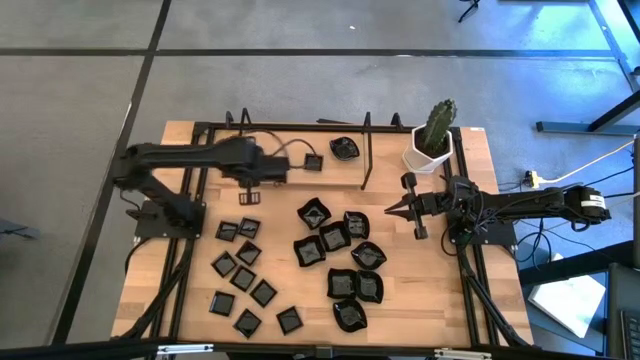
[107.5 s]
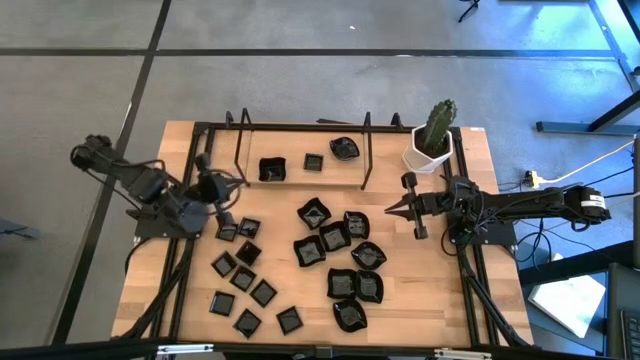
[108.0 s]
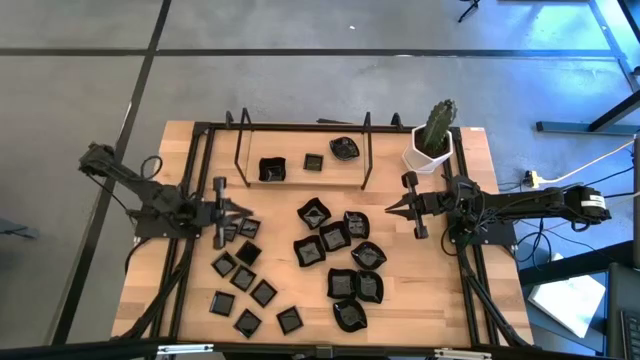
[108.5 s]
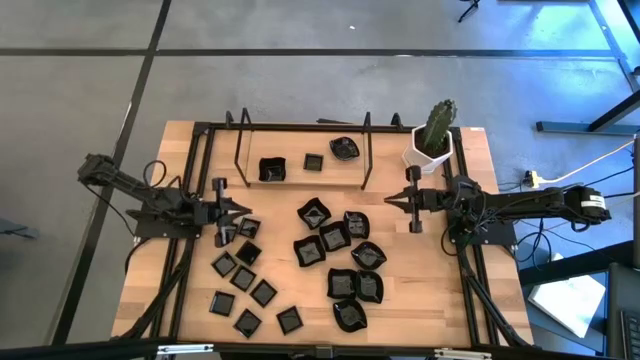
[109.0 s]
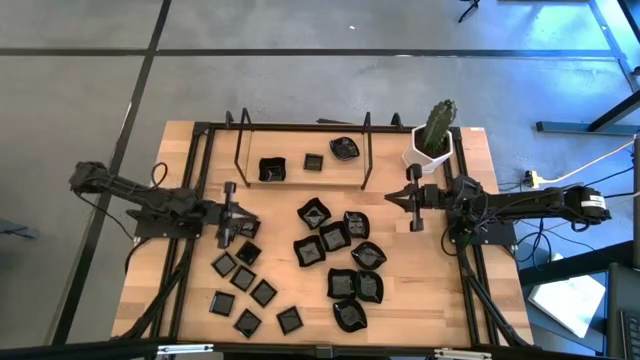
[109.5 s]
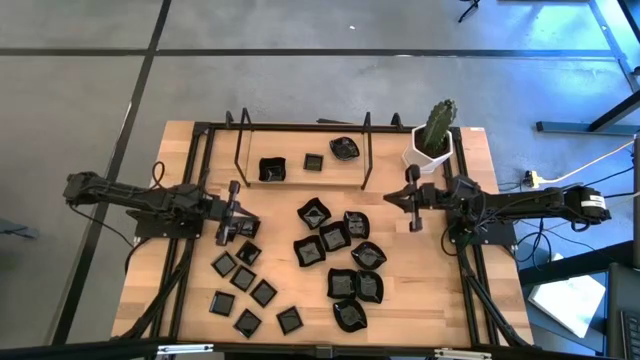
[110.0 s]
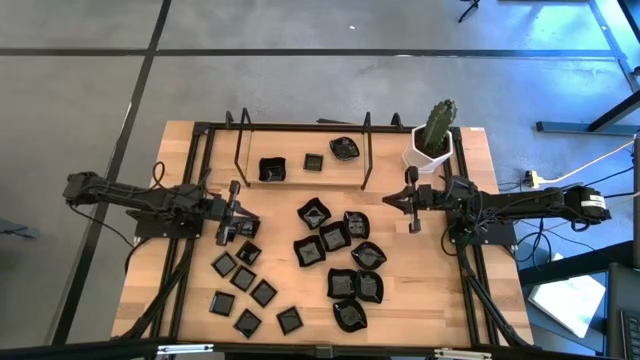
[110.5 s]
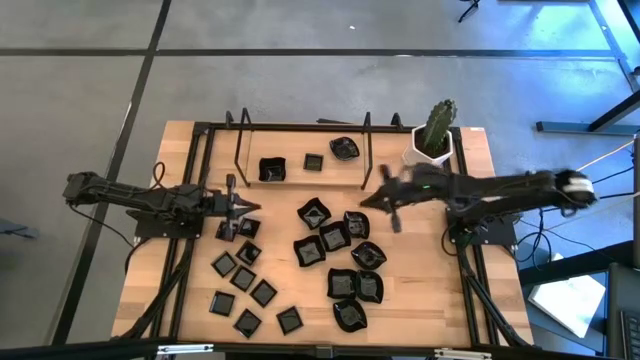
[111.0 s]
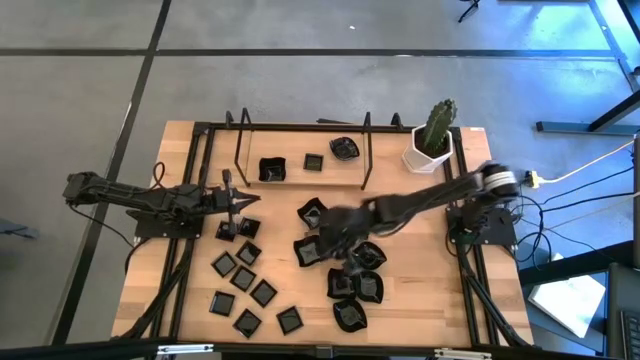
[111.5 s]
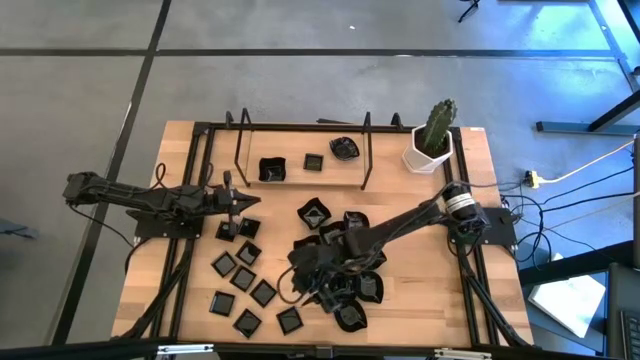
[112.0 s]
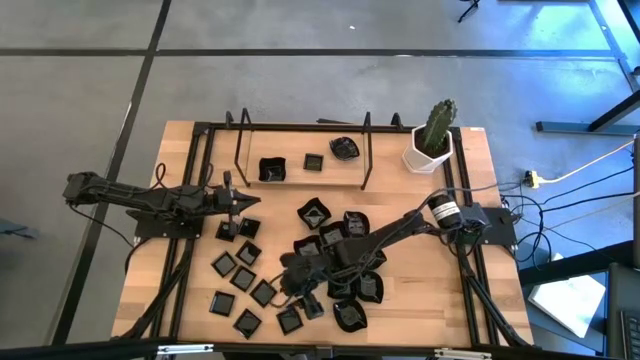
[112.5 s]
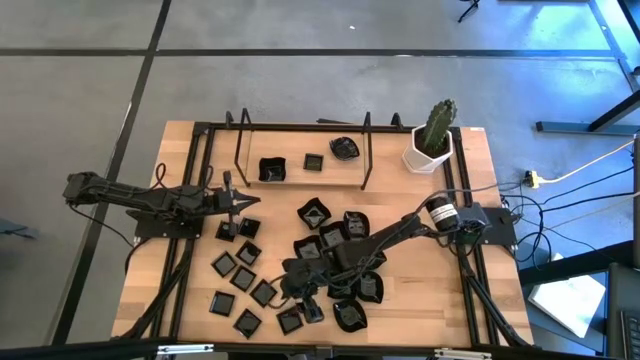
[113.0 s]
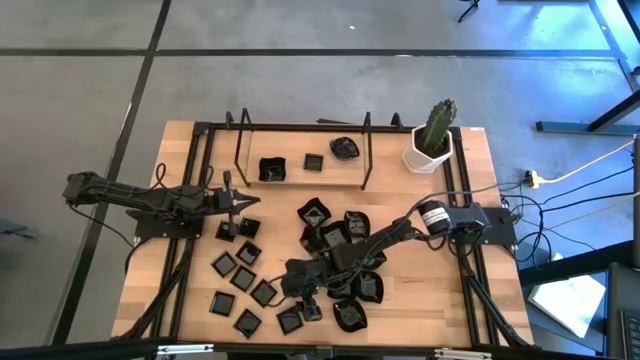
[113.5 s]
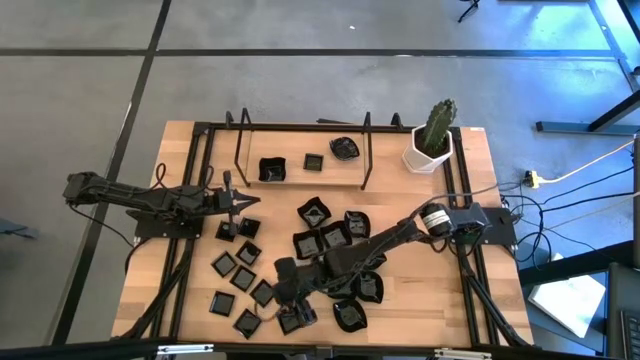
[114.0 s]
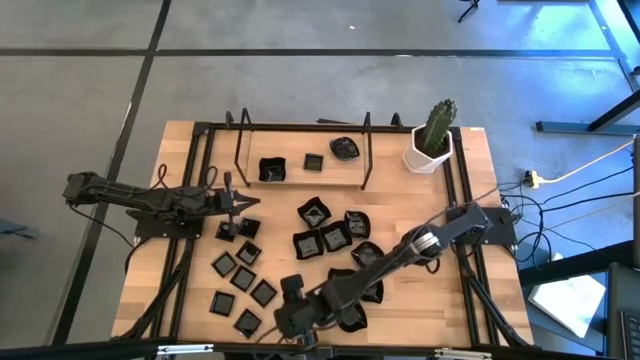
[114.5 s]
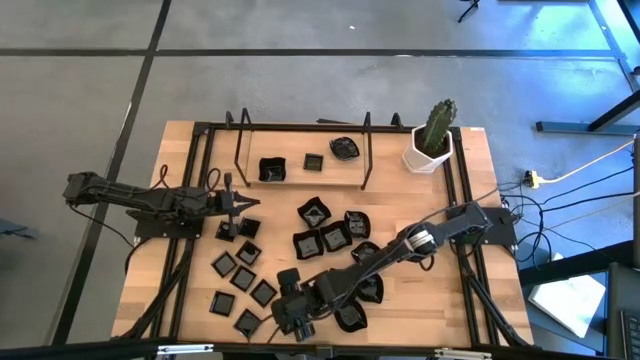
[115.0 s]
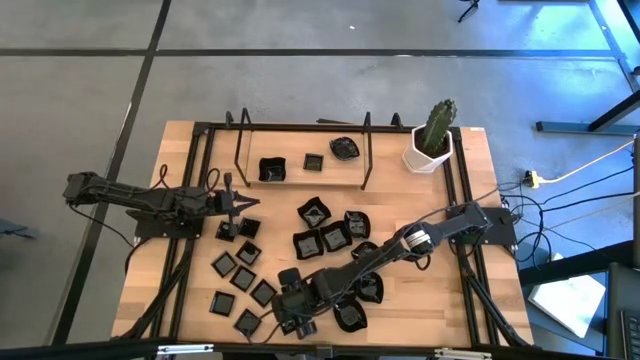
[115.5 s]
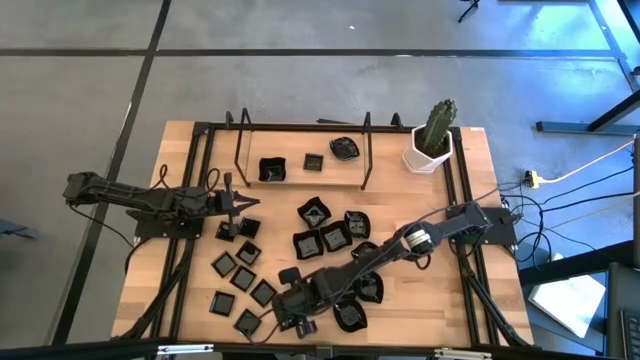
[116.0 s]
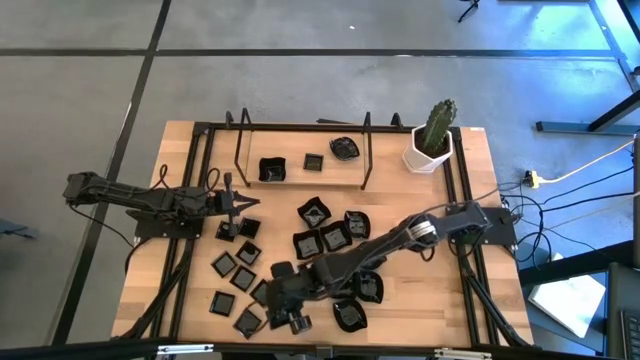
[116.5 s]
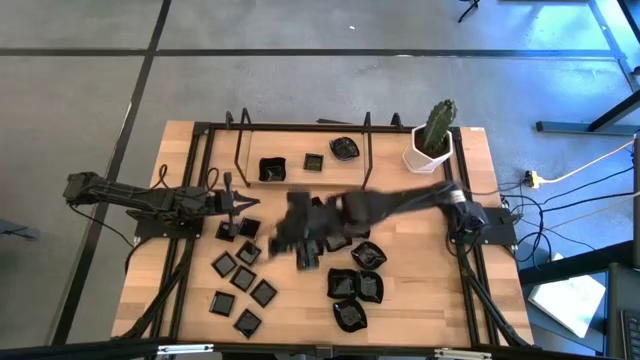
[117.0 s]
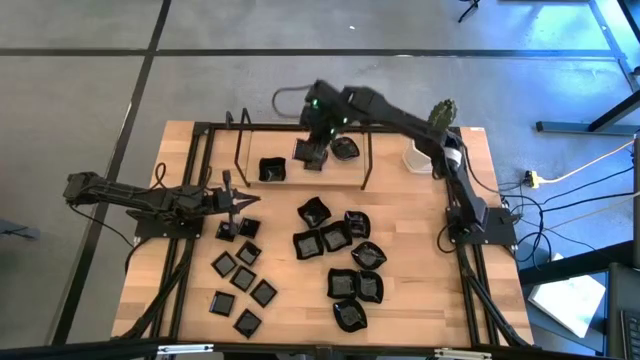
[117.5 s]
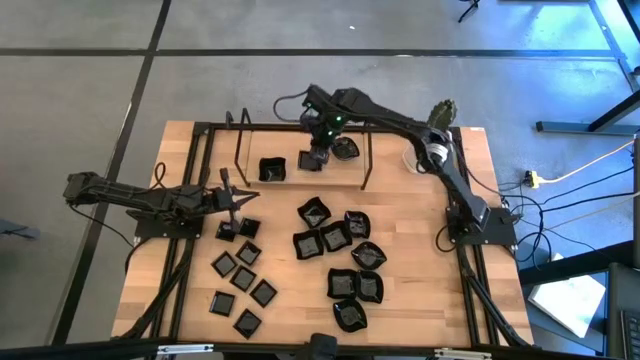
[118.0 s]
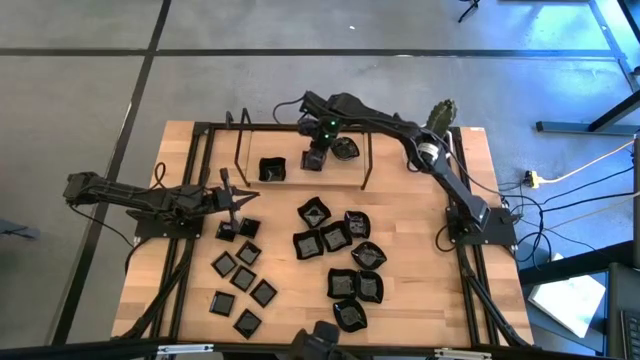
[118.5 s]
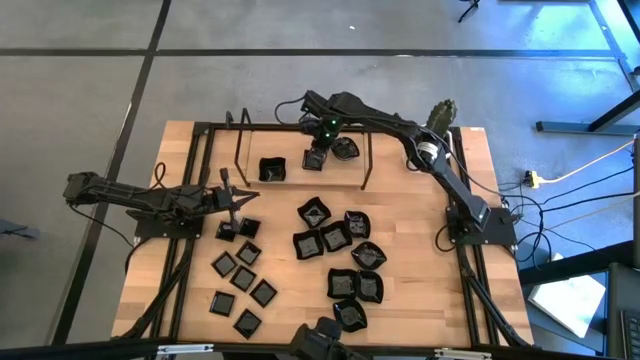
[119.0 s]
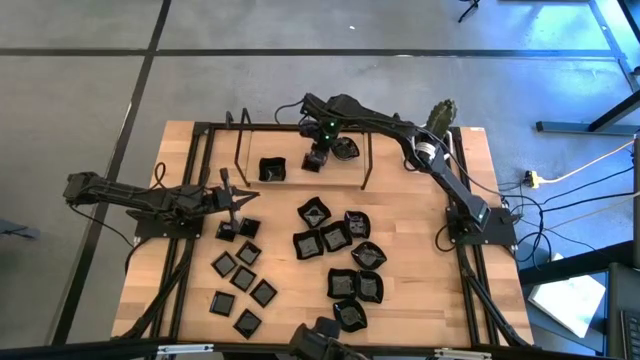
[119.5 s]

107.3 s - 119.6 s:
Task: Pick & Place Mini shaped plates
Stack the square plate on top of the square plate on the shelf

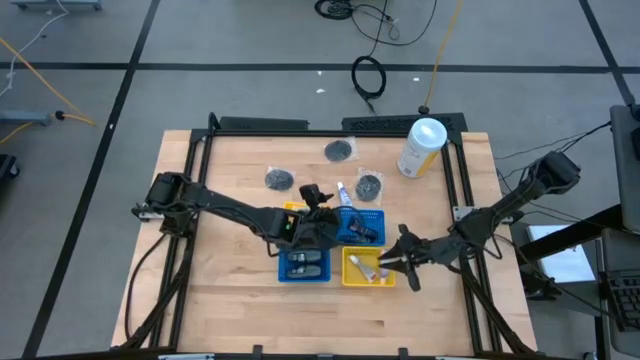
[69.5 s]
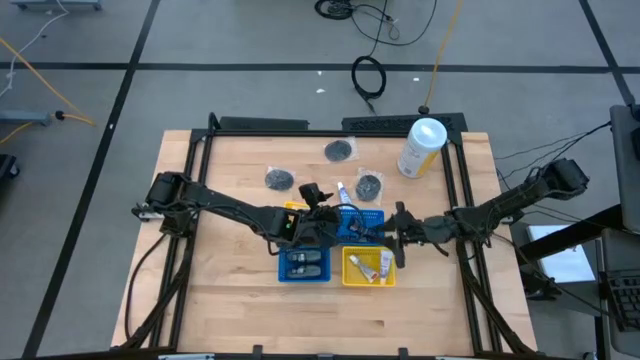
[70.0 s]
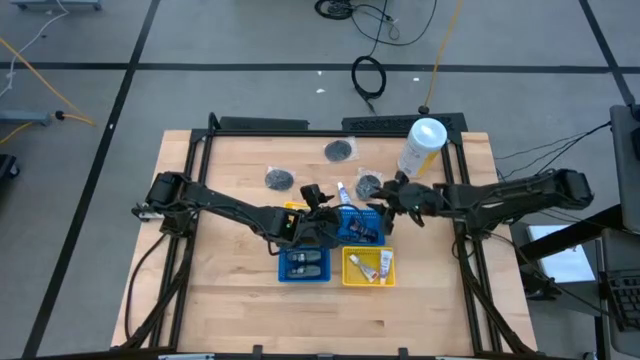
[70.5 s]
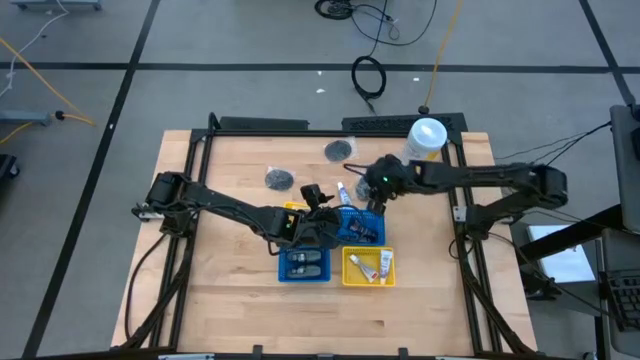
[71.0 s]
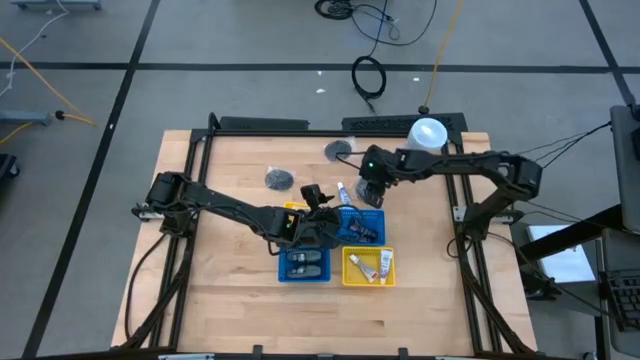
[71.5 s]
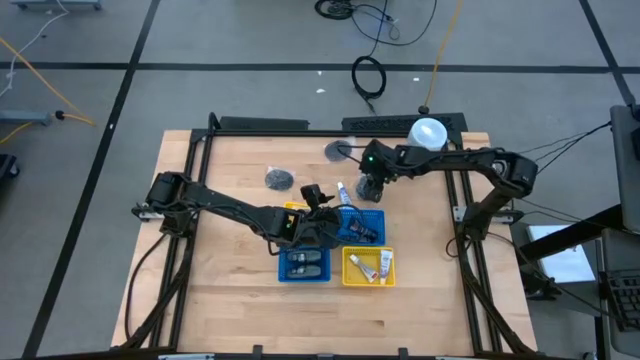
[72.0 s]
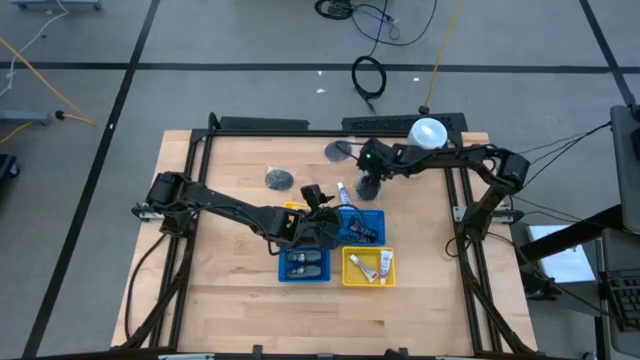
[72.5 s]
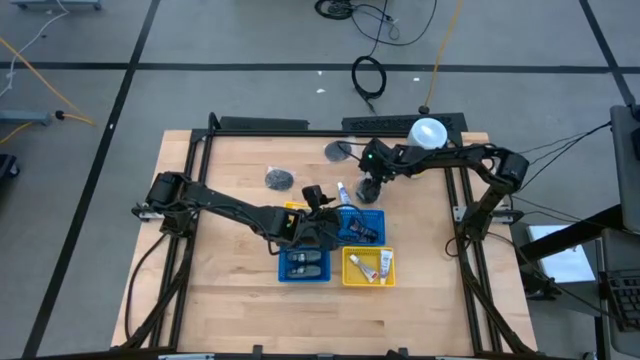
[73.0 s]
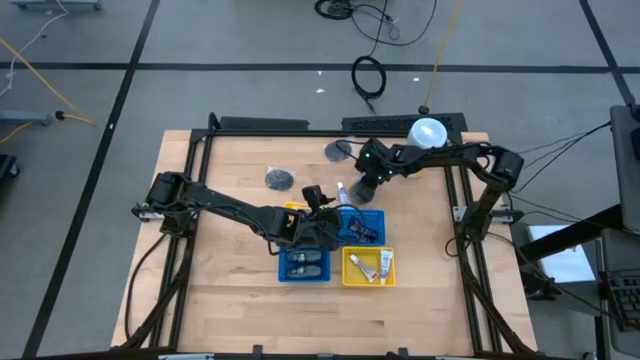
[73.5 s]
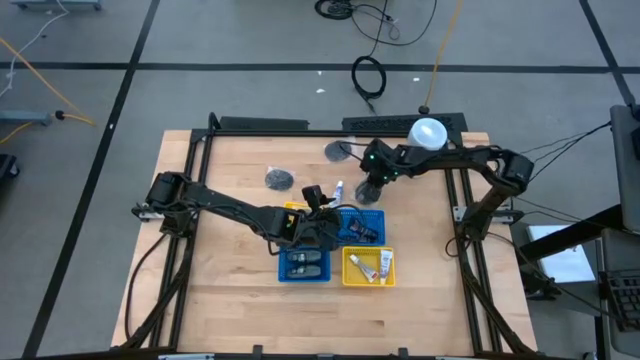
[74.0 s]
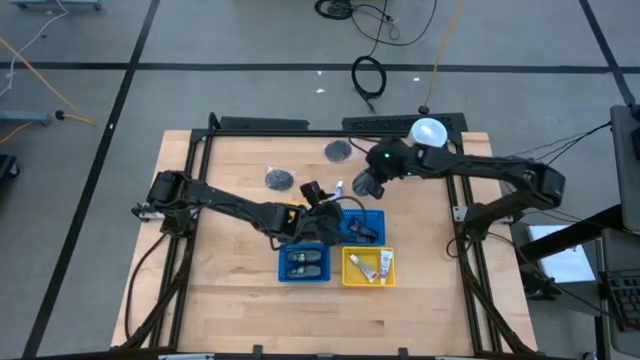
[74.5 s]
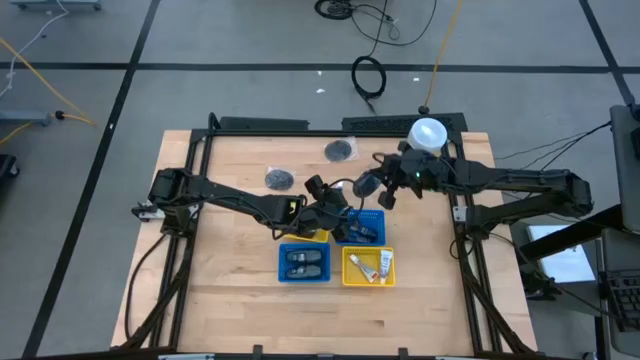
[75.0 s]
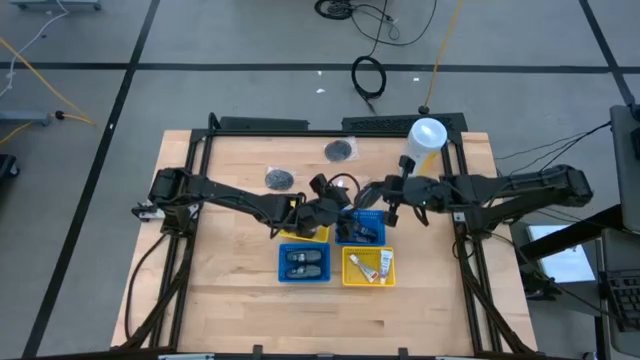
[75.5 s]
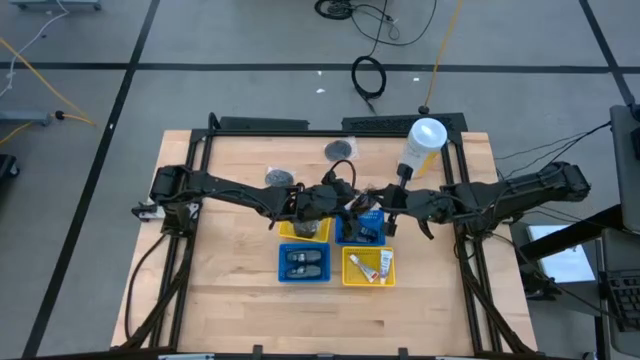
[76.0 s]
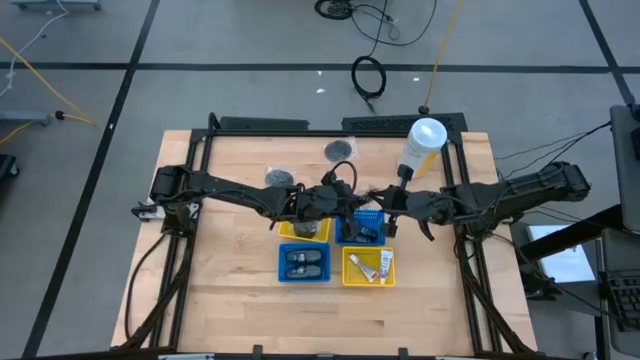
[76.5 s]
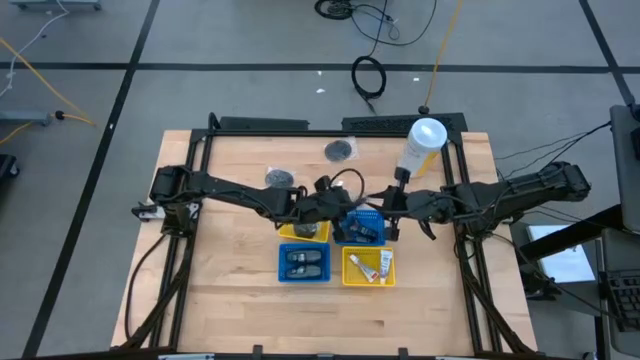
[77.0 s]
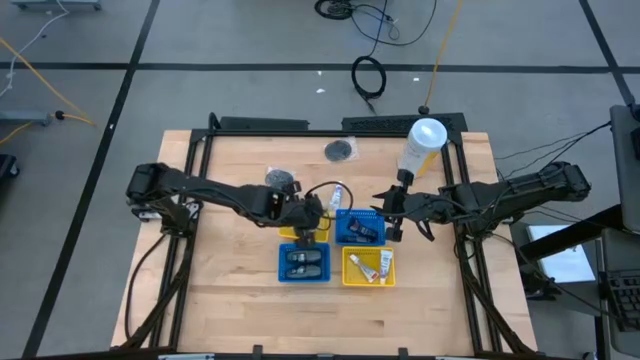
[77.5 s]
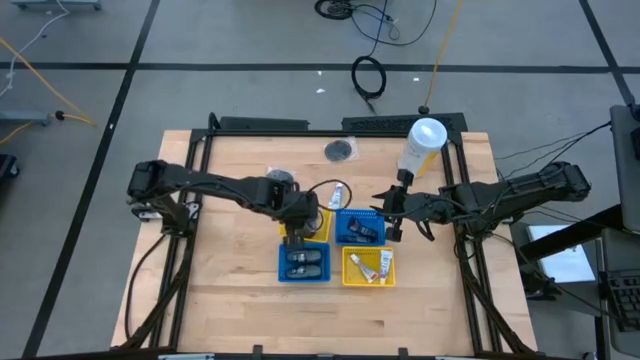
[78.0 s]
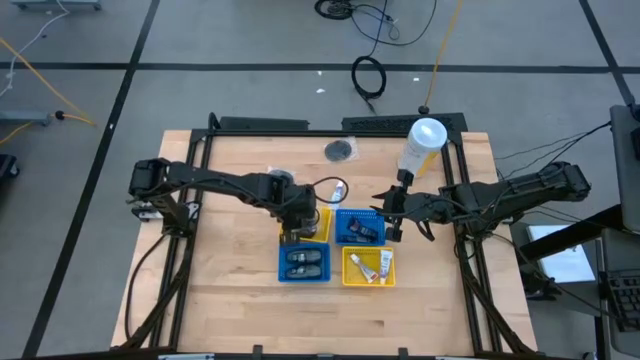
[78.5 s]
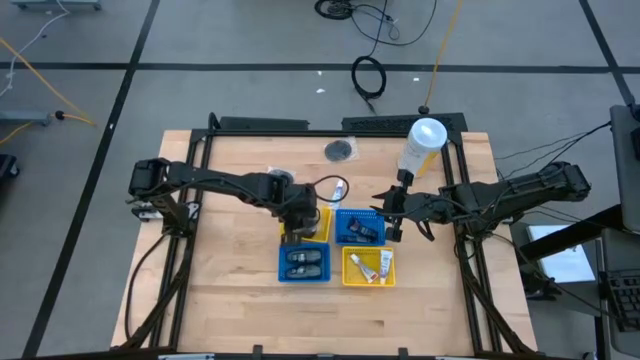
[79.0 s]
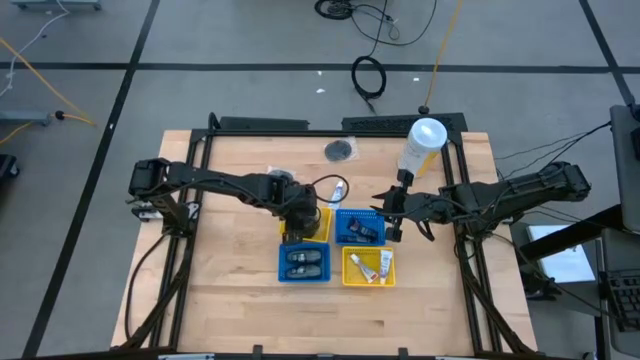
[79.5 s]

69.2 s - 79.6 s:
Task: Pick & Place Travel size toiletries
Put the black hairbrush into the top yellow basket
